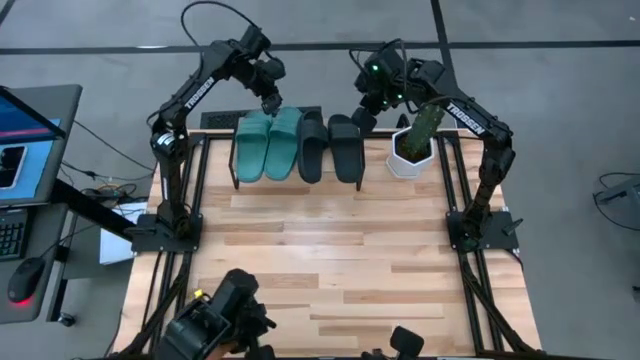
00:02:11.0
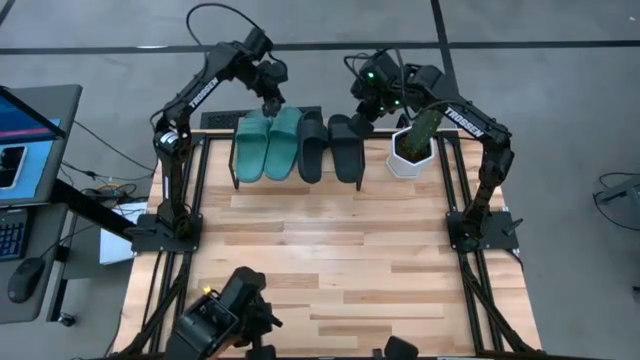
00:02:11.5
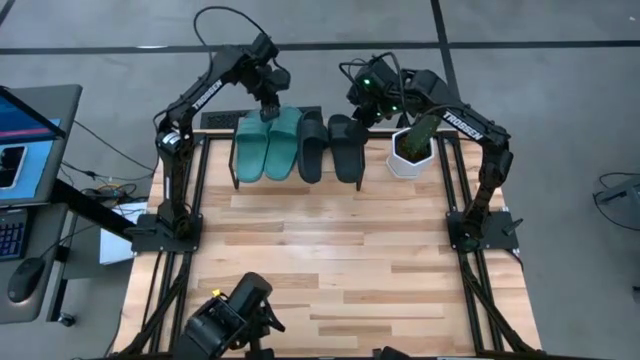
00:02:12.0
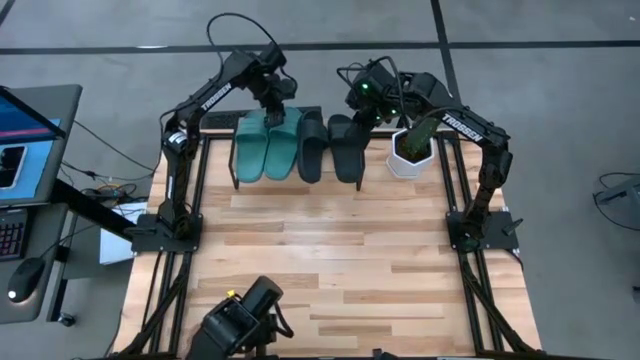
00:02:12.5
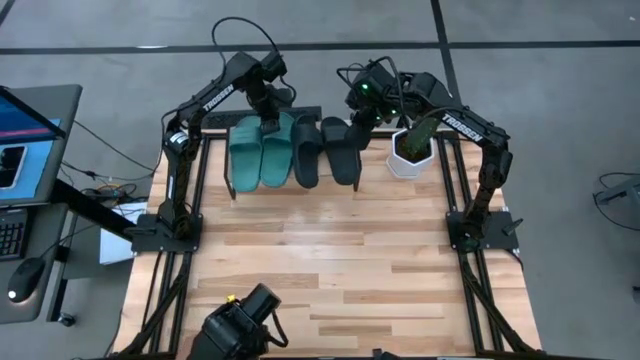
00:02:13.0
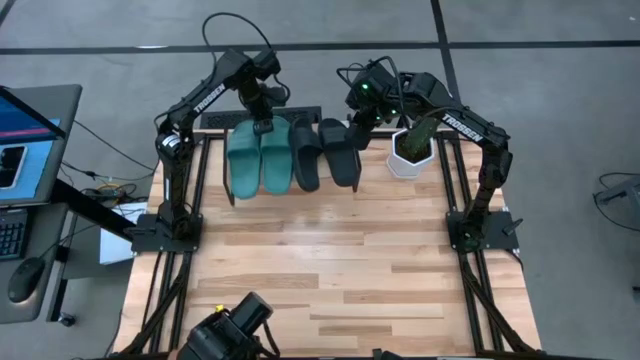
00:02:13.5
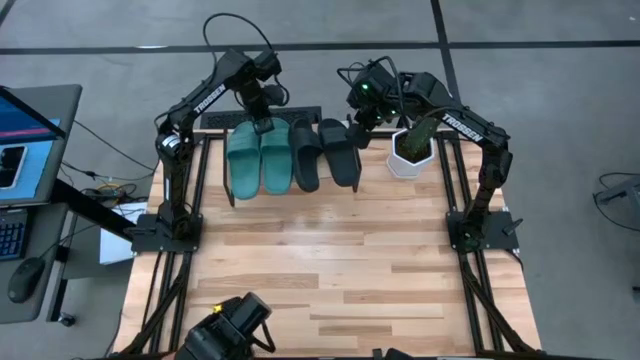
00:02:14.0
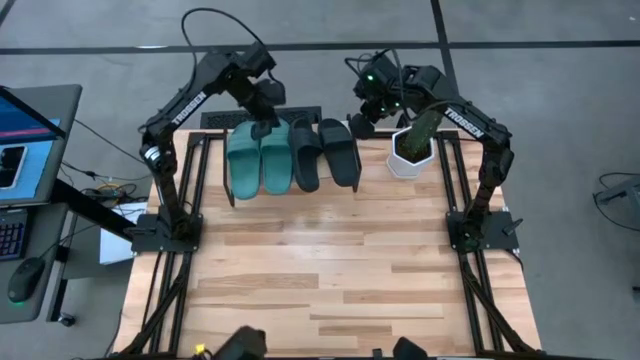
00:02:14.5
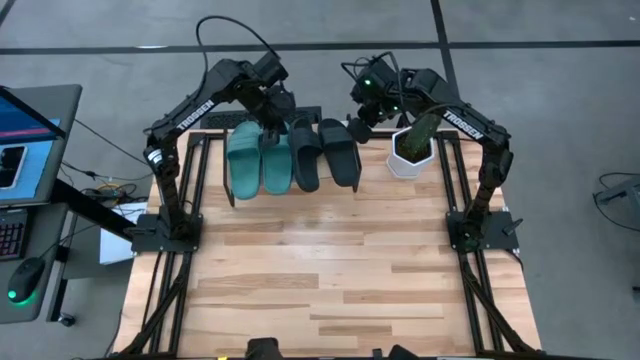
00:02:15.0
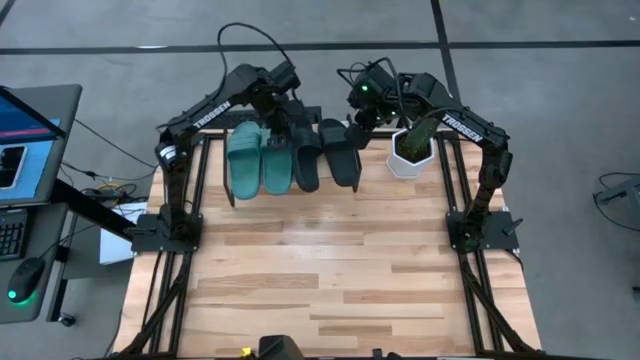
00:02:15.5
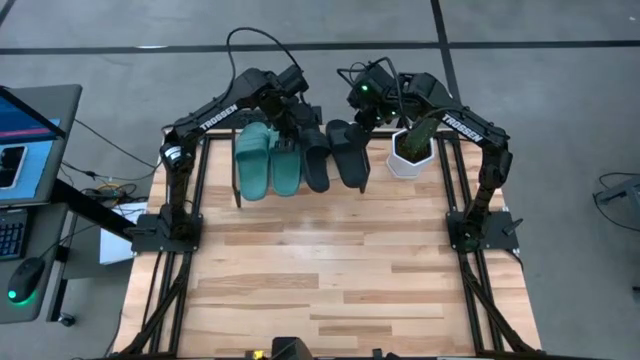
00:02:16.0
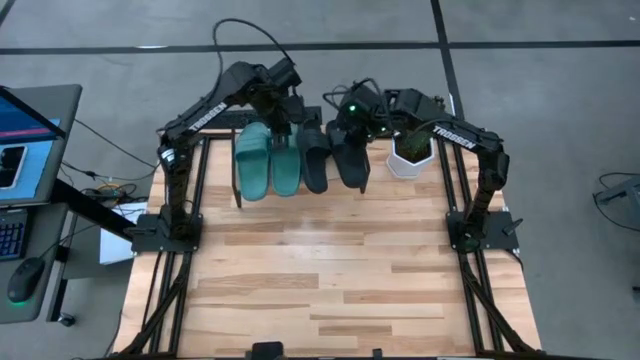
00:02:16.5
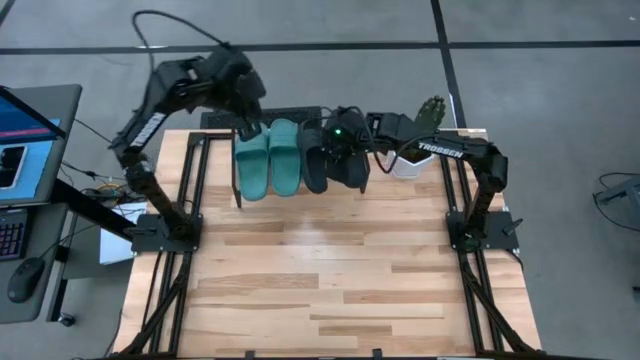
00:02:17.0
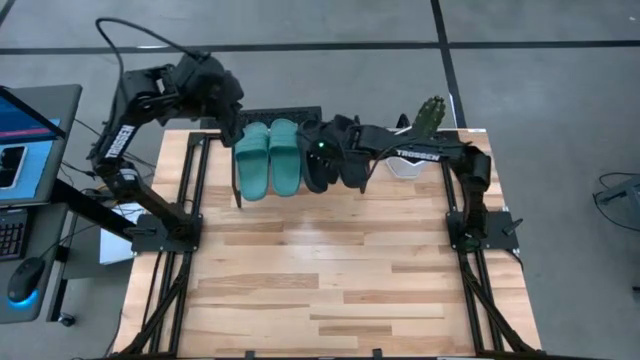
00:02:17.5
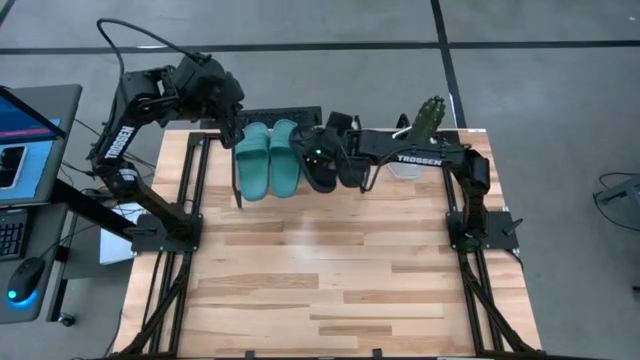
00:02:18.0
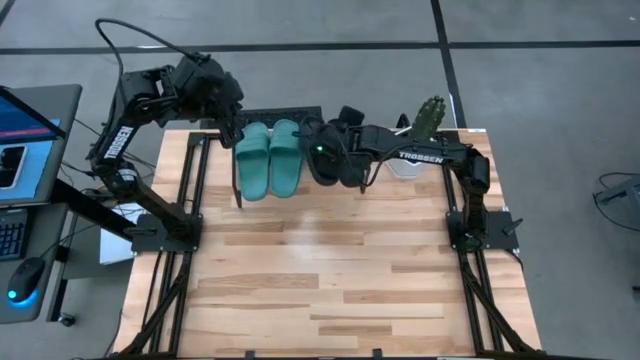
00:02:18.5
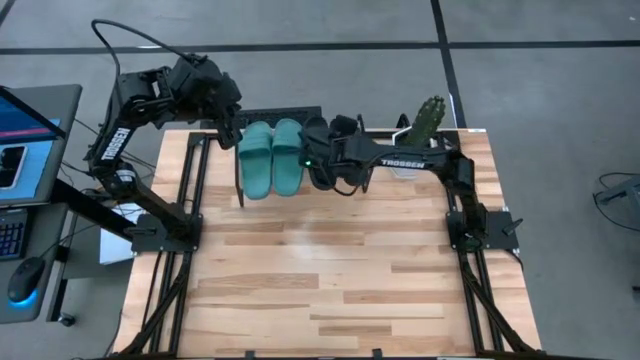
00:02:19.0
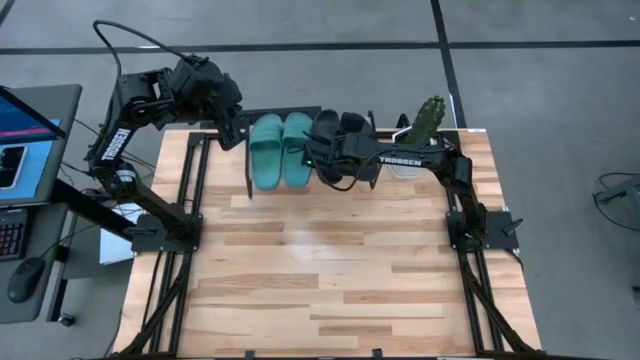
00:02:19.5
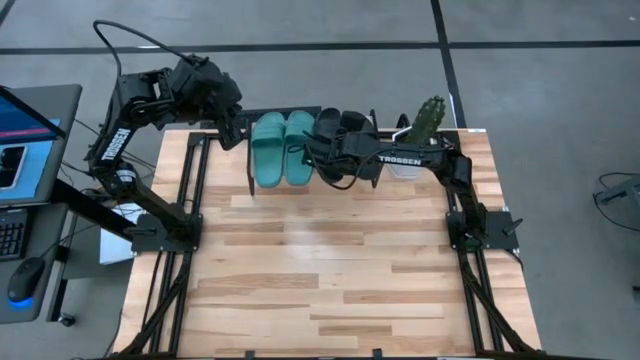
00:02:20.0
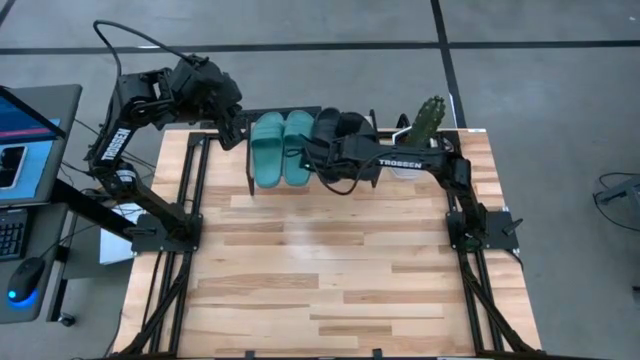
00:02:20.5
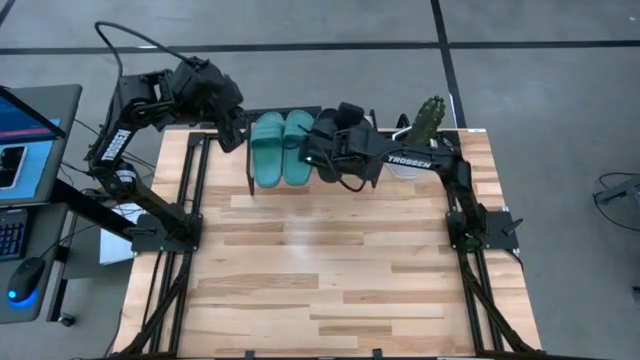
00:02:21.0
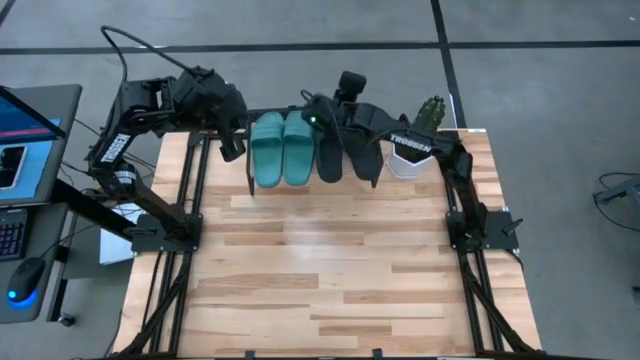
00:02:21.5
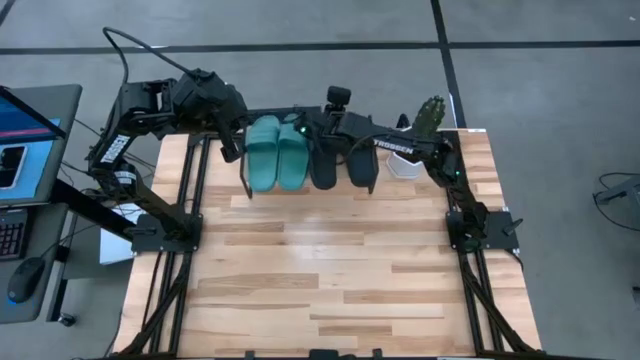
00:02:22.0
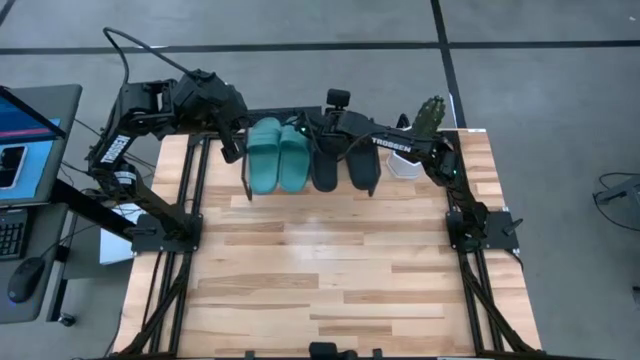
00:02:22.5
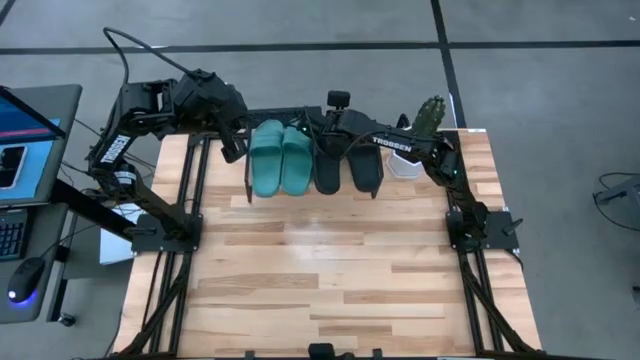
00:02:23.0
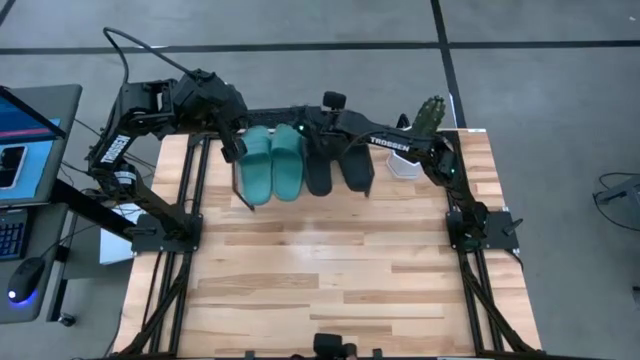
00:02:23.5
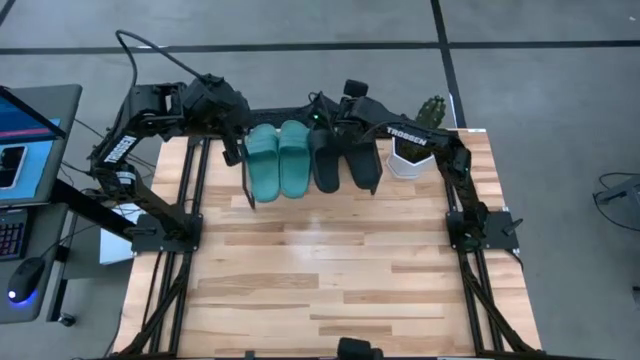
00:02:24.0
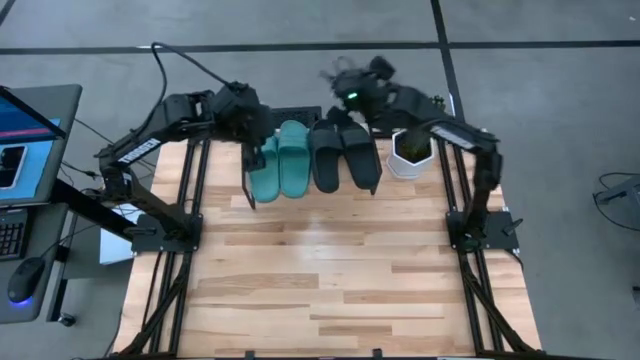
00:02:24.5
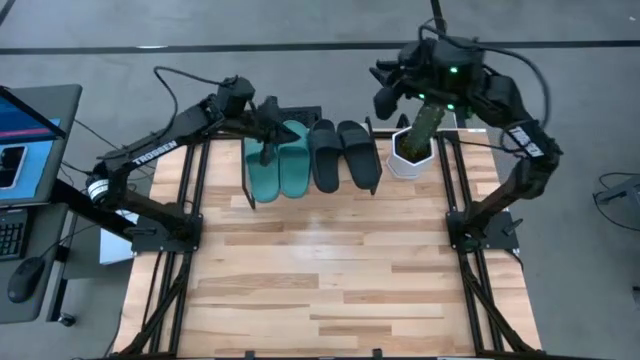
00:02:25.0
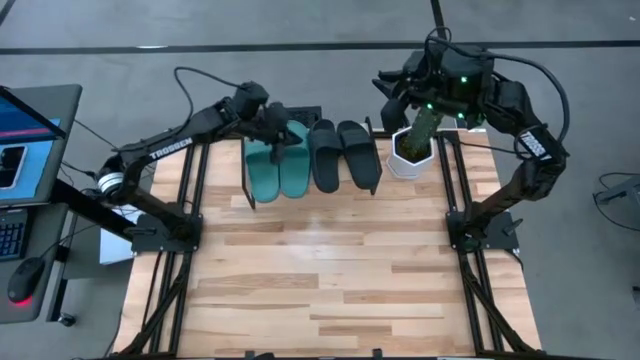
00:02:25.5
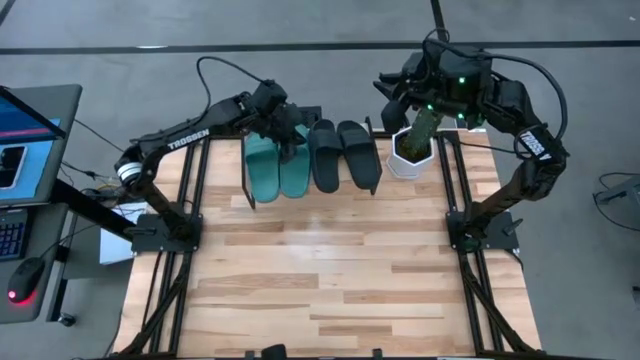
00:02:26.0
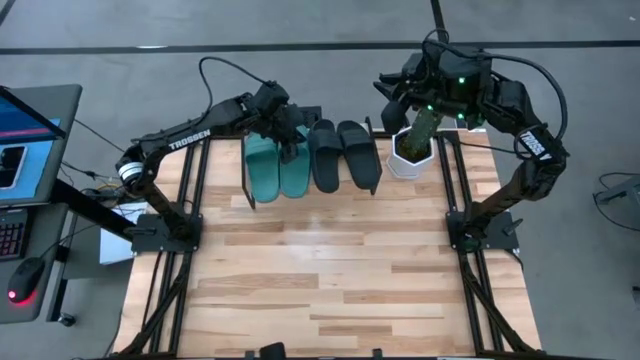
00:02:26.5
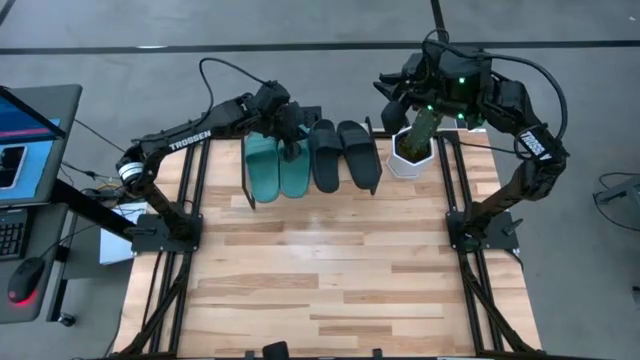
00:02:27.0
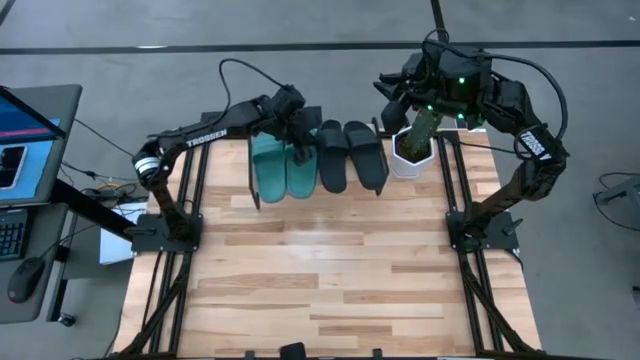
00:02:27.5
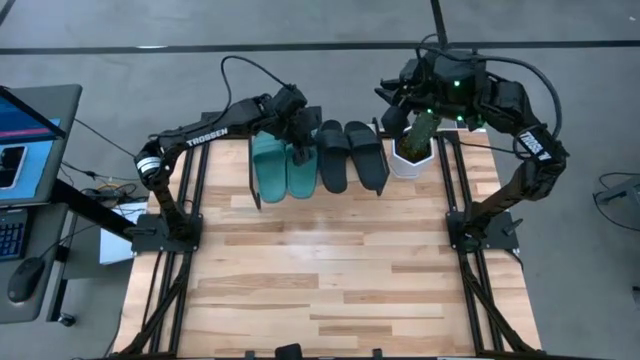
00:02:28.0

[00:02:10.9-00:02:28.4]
Task: Pick and place slides into the shelf
Adjust the slides on the shelf

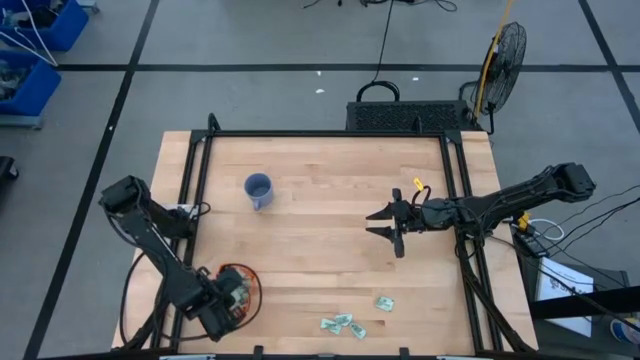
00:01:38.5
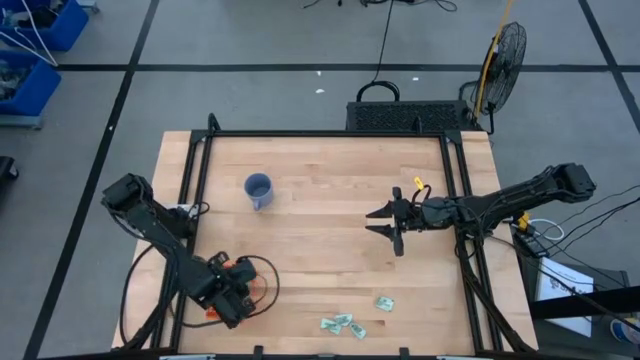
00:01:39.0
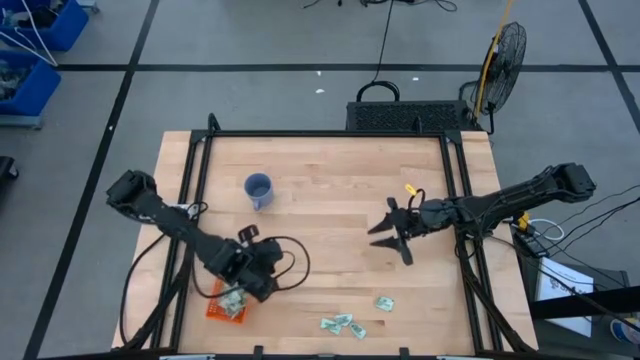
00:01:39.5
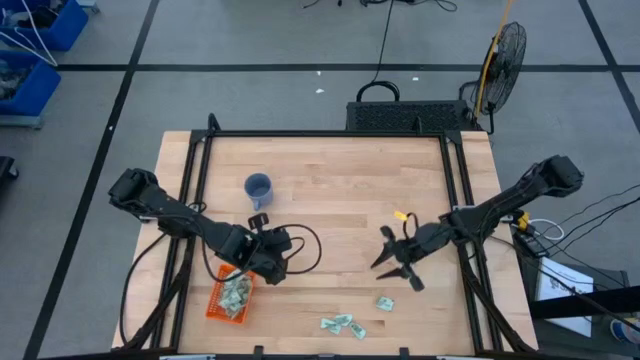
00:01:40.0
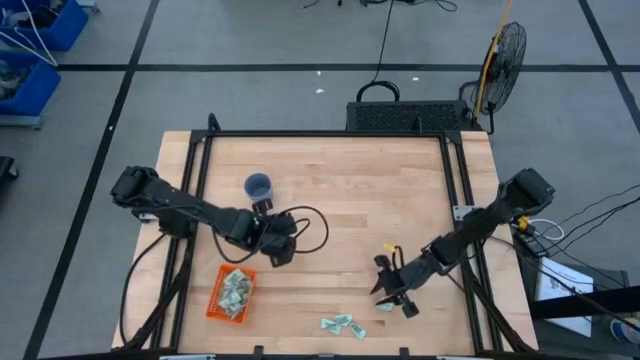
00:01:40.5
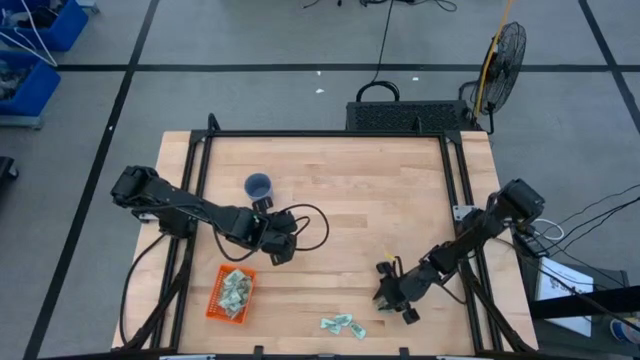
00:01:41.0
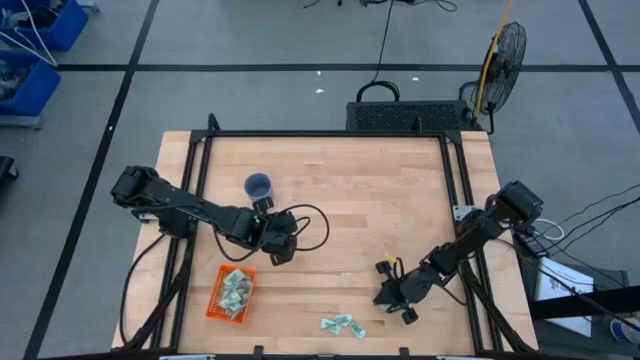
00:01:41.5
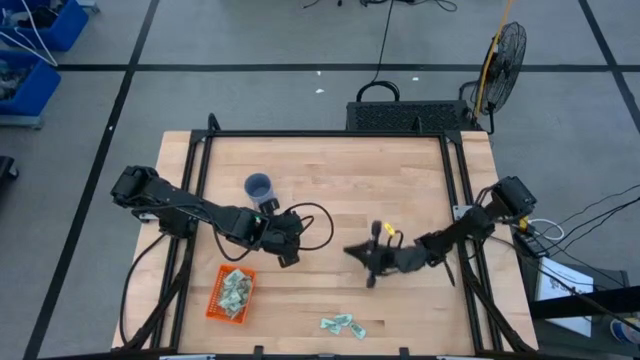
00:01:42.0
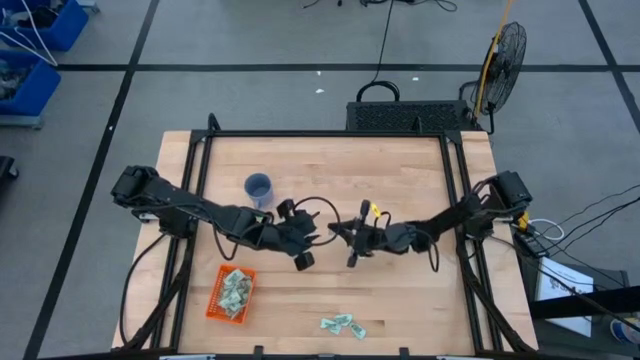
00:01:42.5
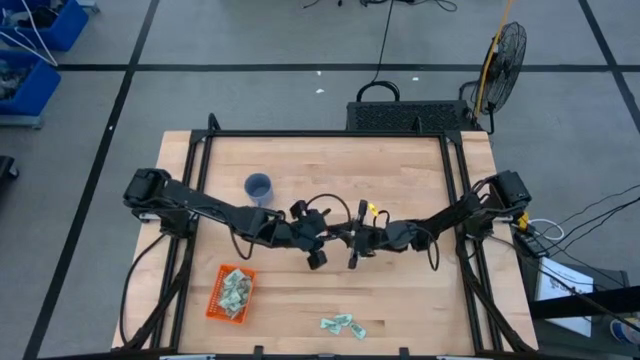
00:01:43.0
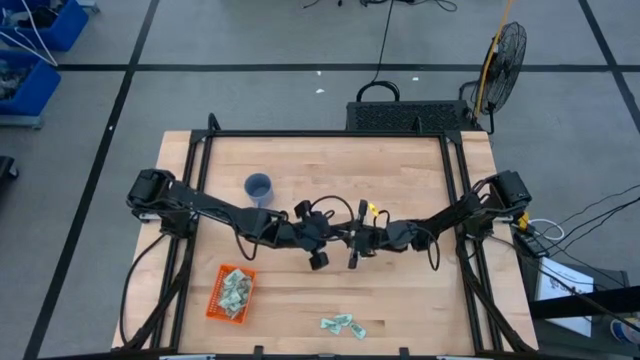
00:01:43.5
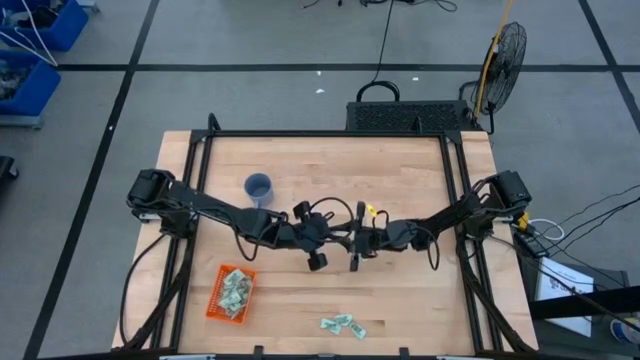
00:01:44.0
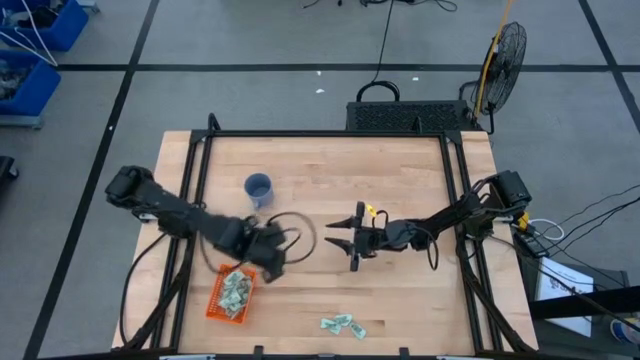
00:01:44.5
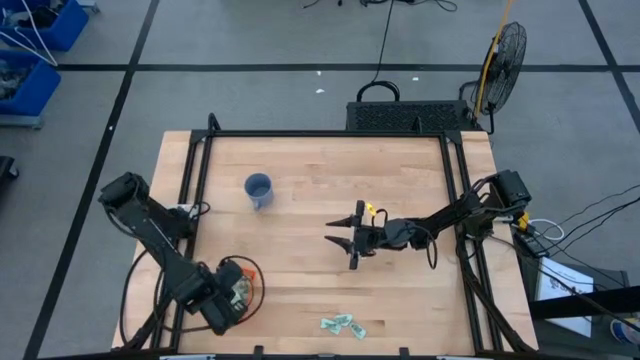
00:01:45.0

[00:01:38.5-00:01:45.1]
Task: Pick and place Stevia / Truvia into bins
Put the stevia packet into the orange bin
